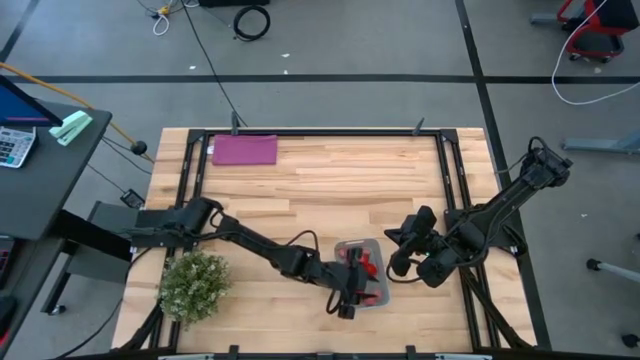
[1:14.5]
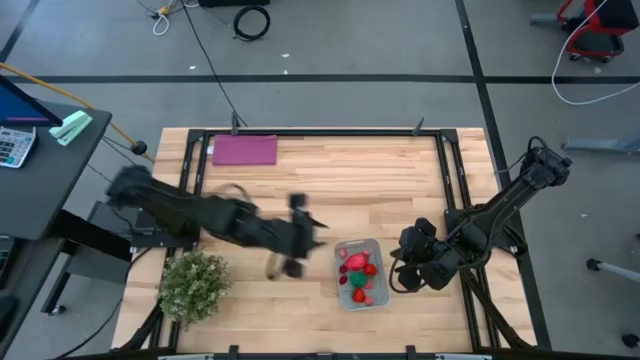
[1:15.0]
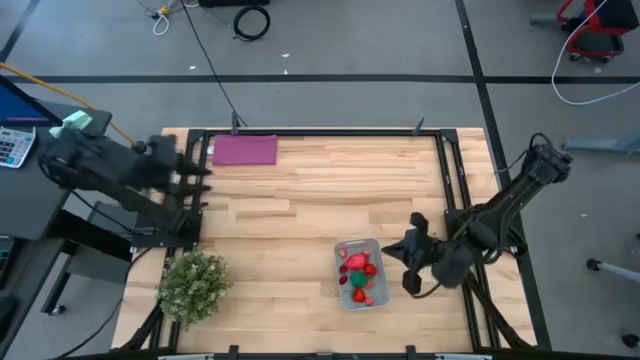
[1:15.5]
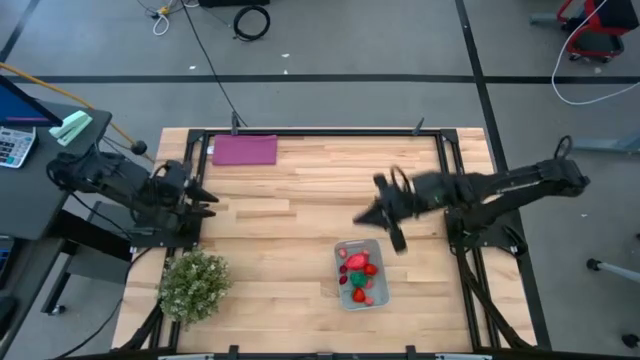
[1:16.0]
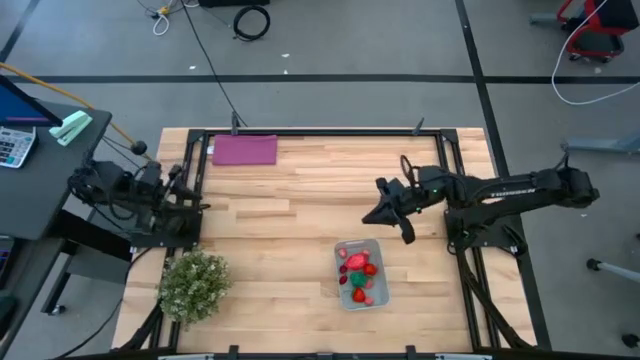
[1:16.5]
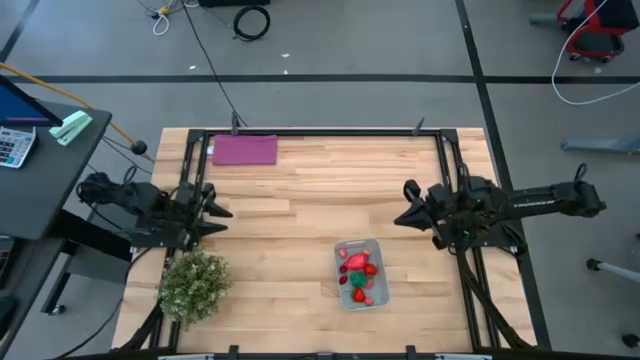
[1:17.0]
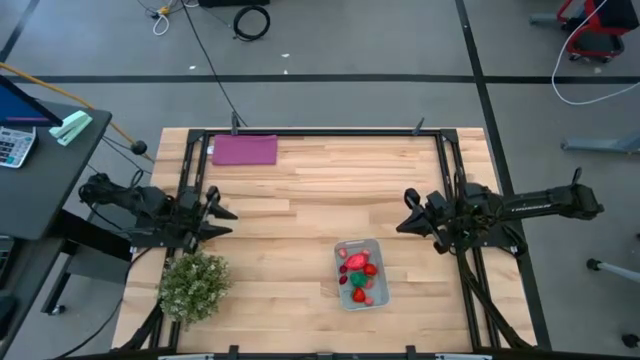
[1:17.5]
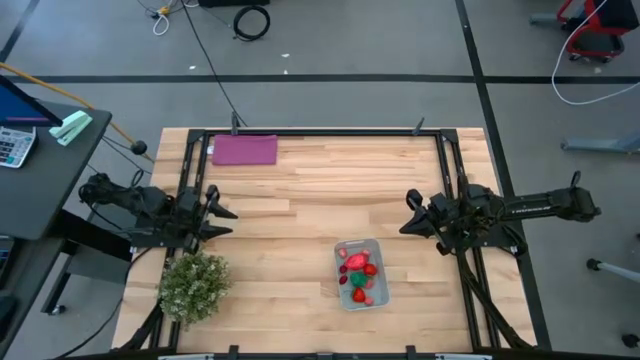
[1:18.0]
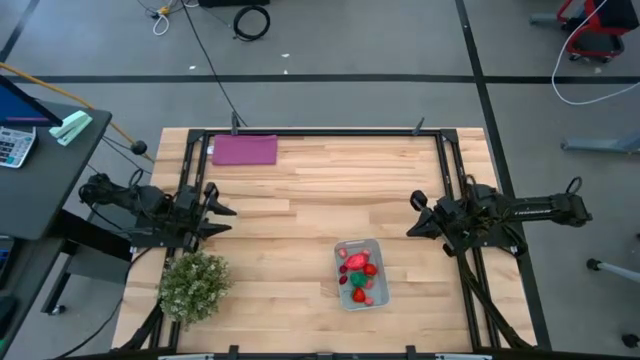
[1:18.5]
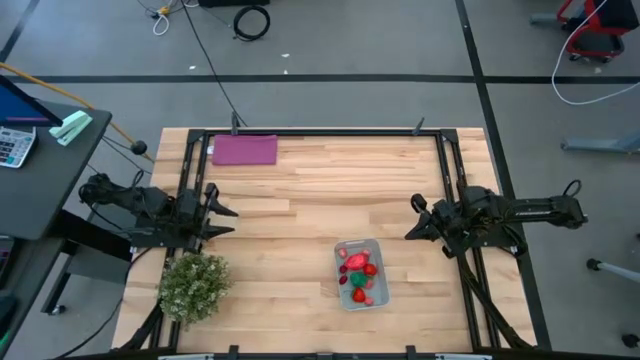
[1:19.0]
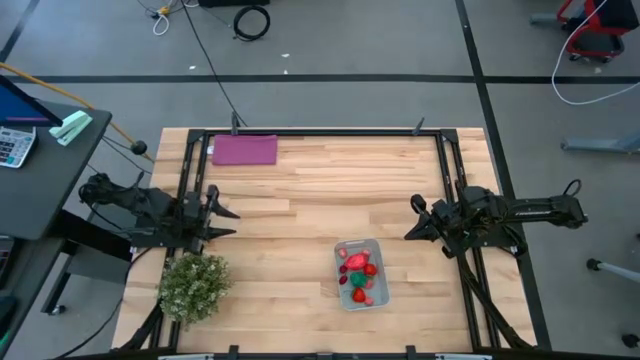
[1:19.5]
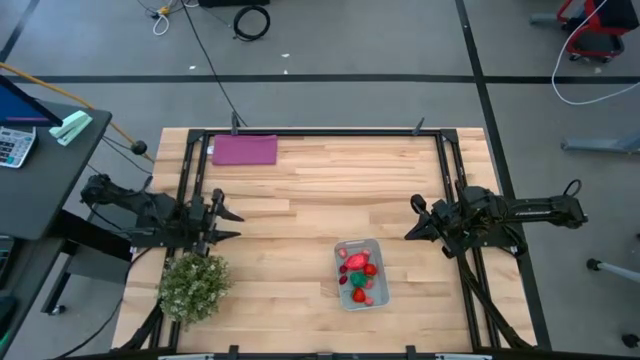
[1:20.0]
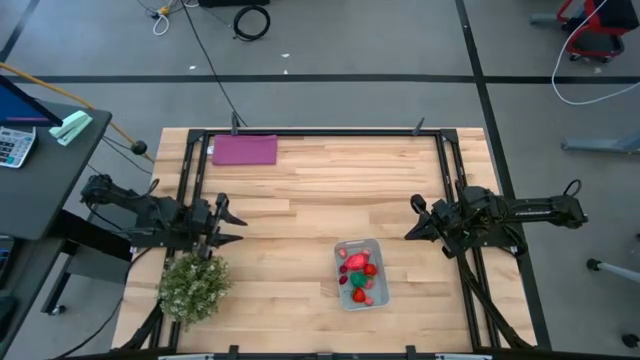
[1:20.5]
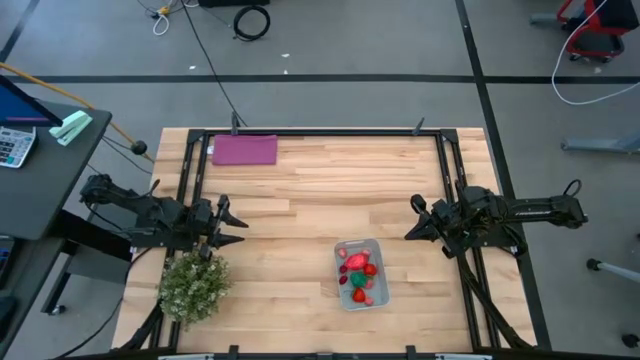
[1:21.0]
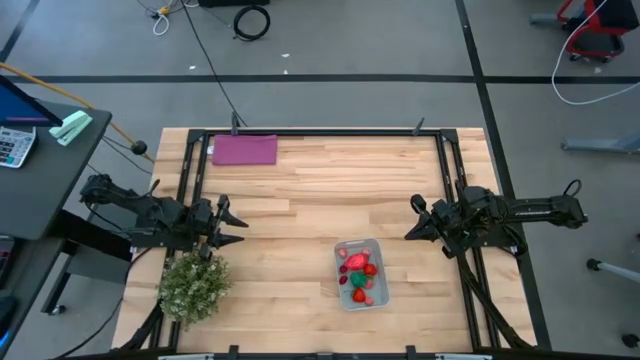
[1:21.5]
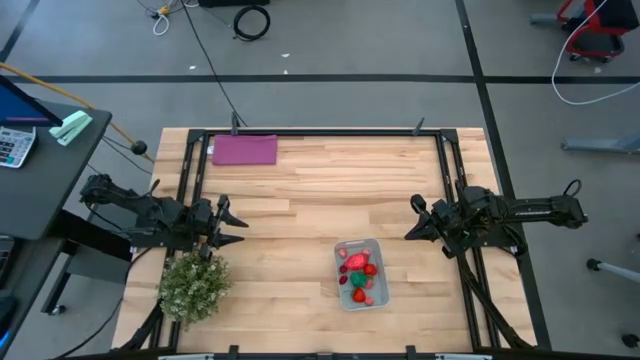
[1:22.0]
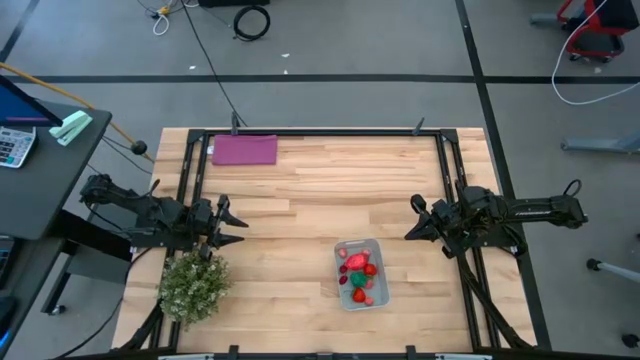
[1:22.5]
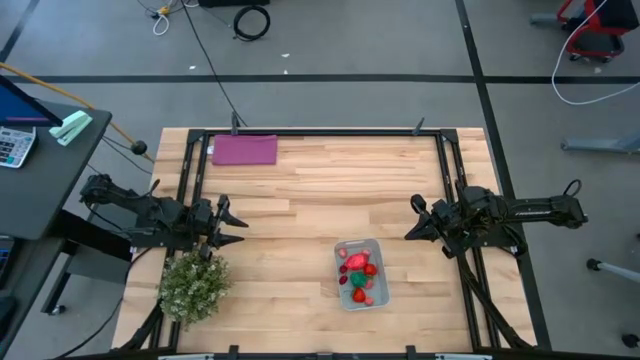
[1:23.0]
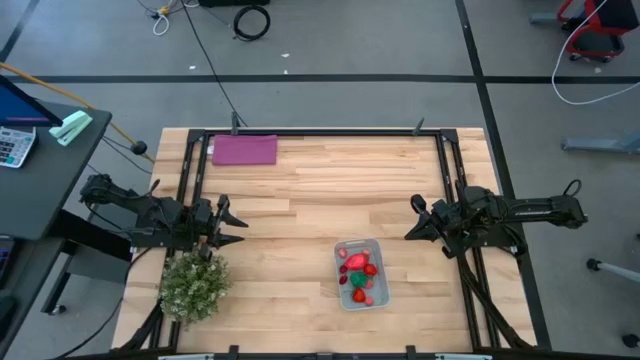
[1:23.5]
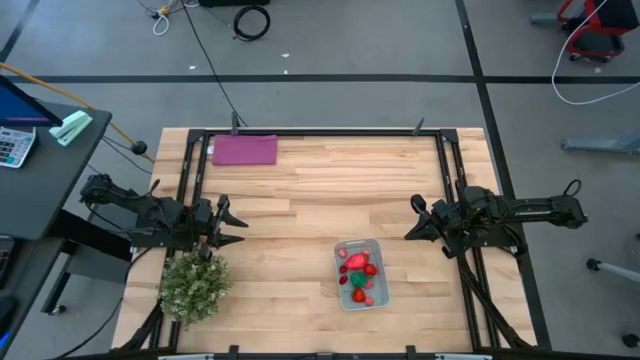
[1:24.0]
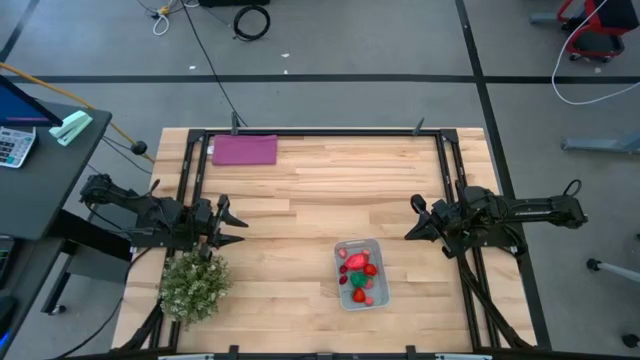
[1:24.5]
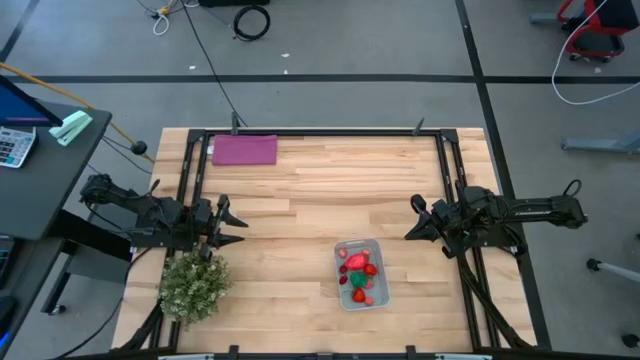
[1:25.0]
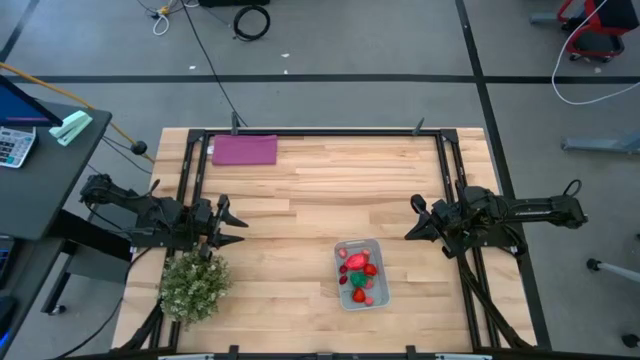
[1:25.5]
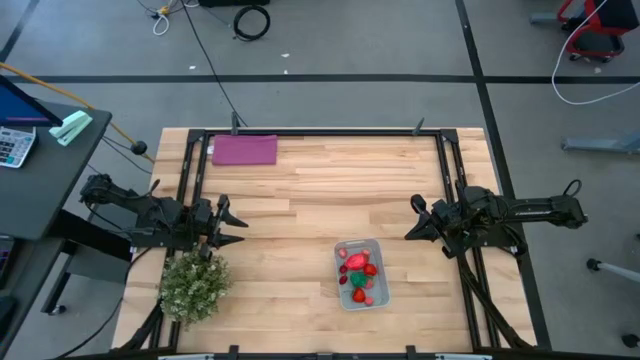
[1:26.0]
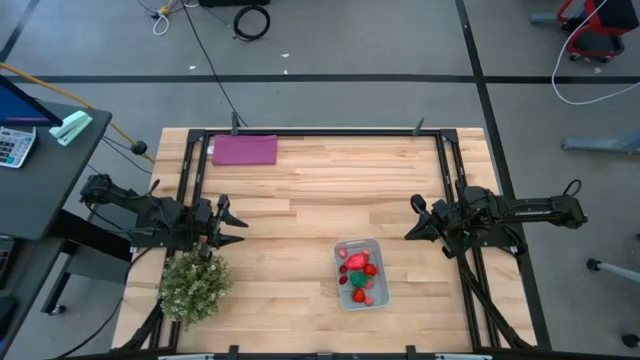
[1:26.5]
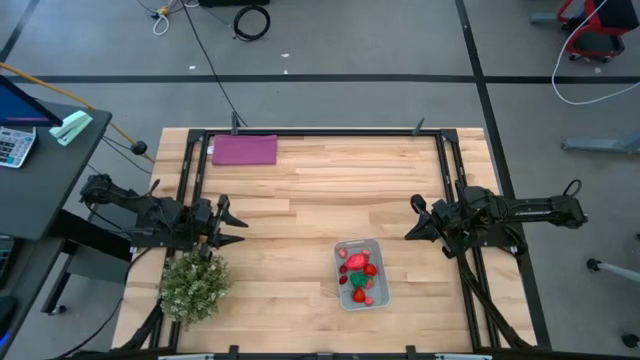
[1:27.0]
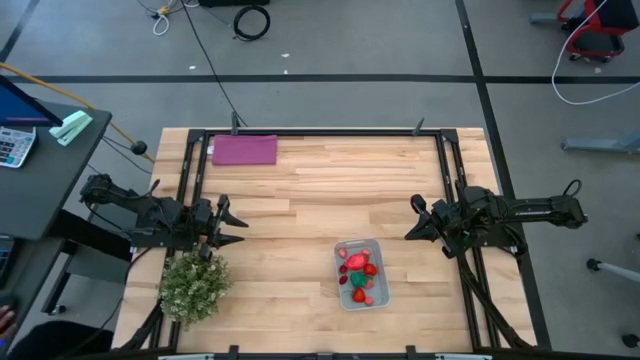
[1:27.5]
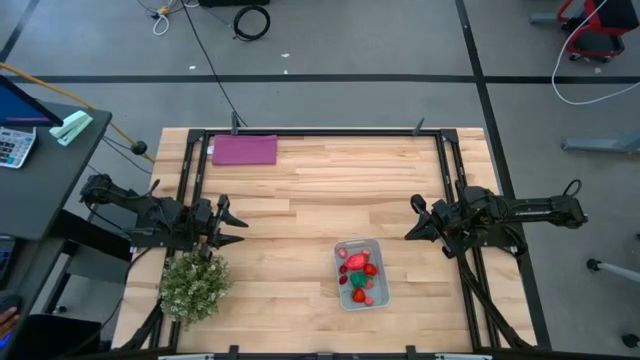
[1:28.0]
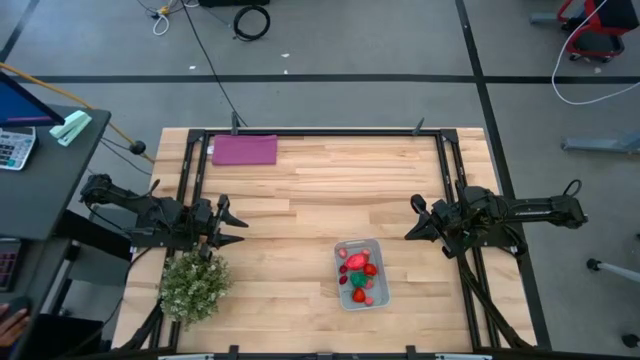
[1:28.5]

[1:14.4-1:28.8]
Task: Pick and placing Produce into tupperware
Return to Home Position

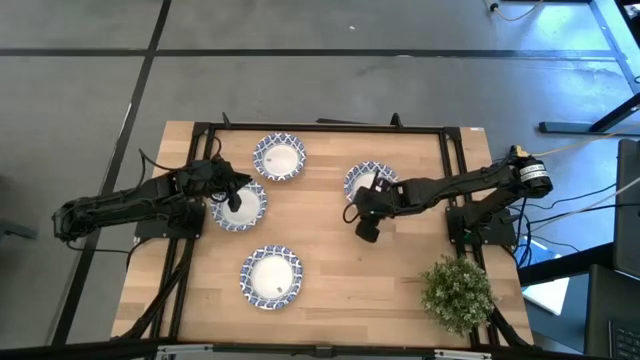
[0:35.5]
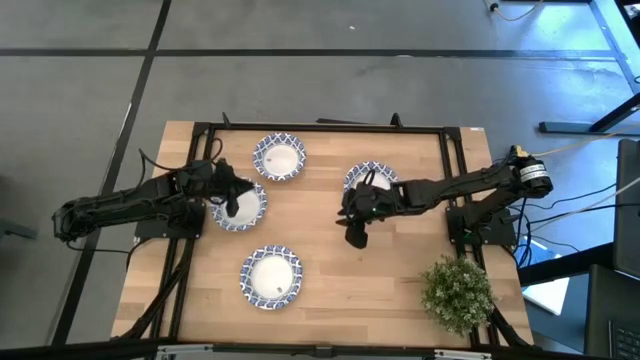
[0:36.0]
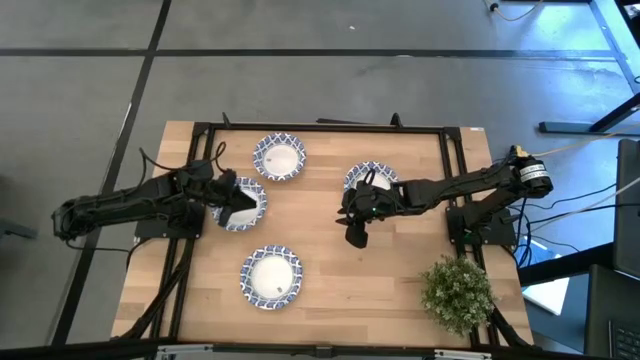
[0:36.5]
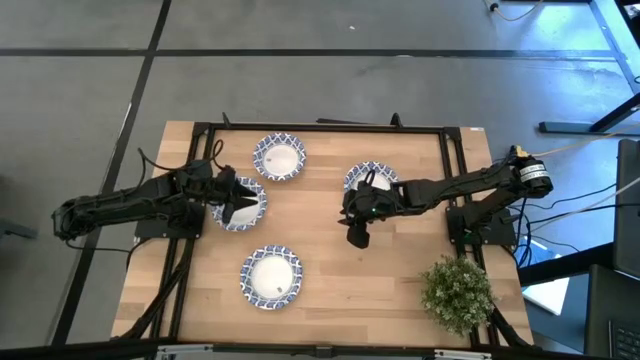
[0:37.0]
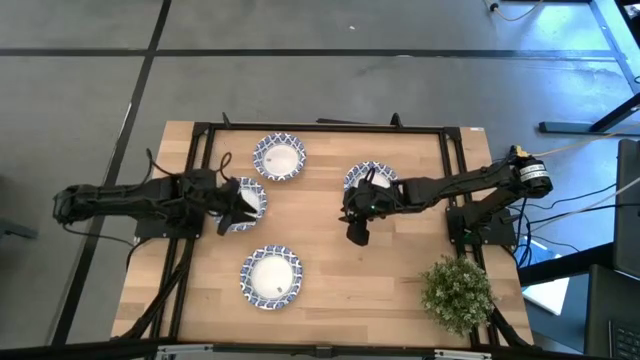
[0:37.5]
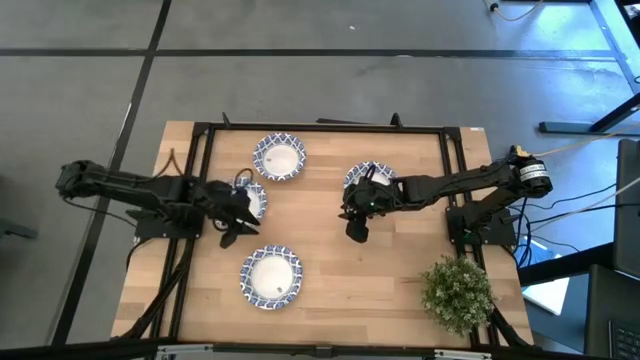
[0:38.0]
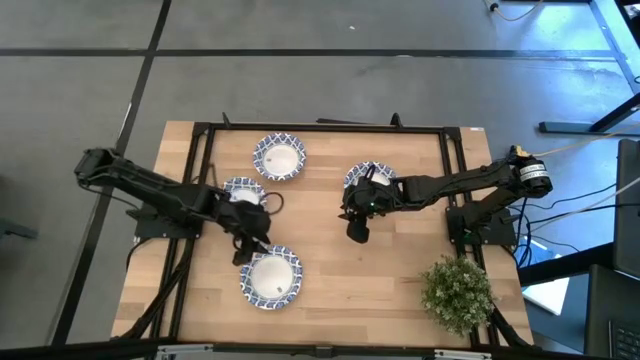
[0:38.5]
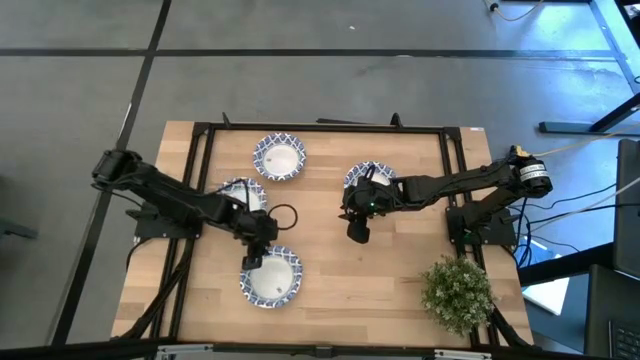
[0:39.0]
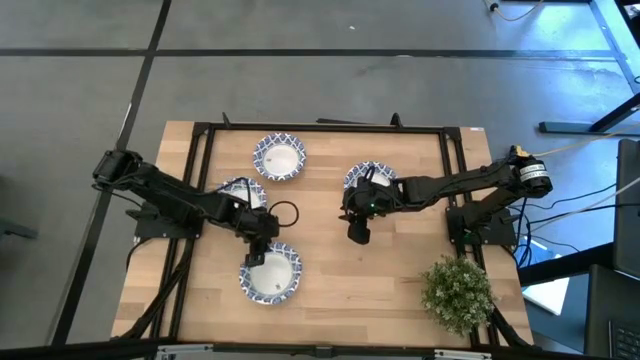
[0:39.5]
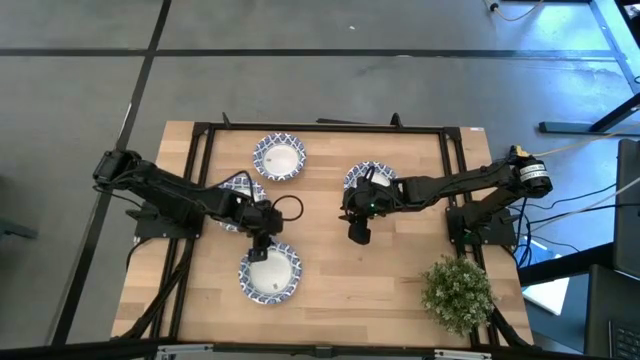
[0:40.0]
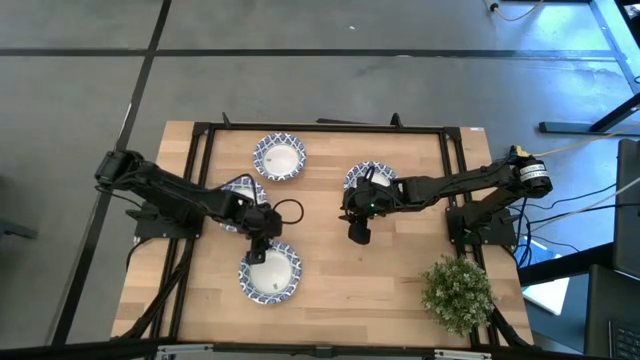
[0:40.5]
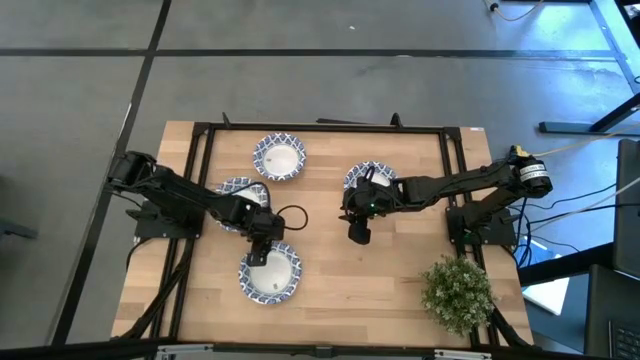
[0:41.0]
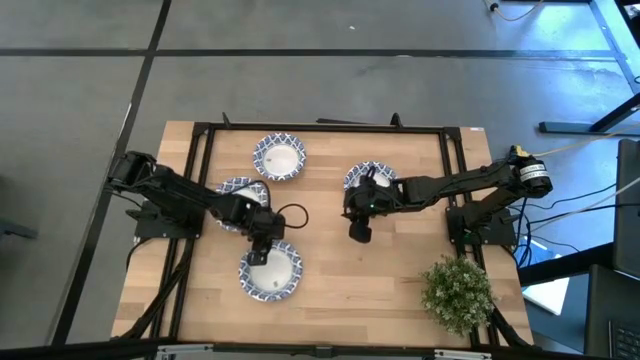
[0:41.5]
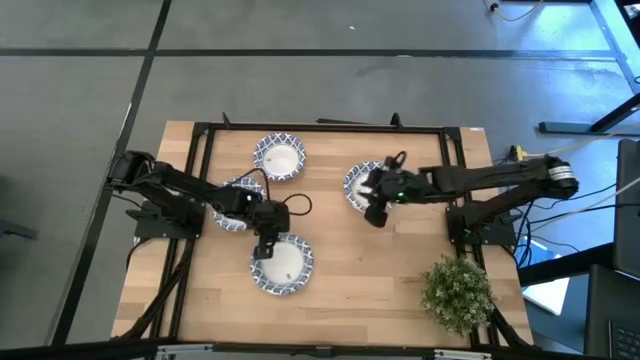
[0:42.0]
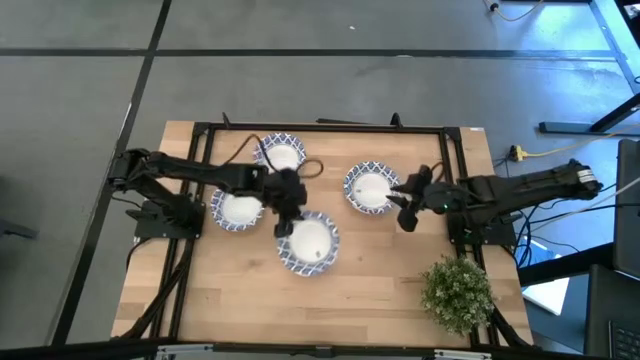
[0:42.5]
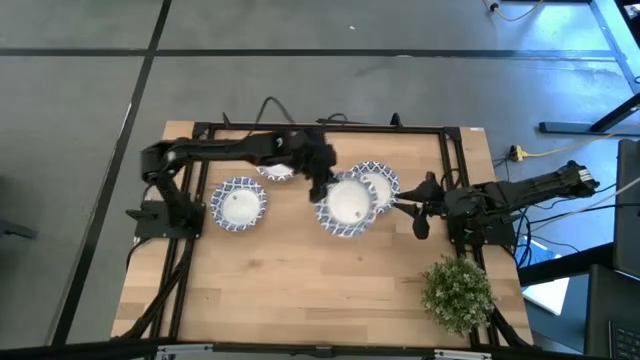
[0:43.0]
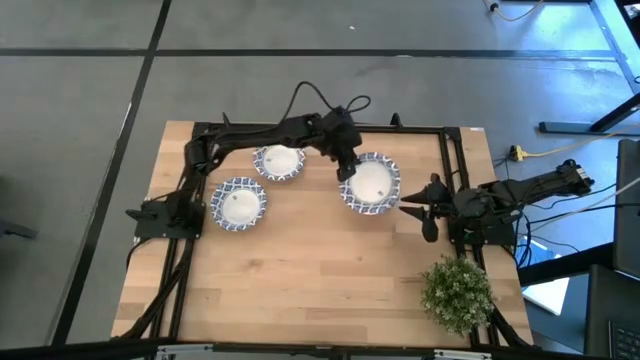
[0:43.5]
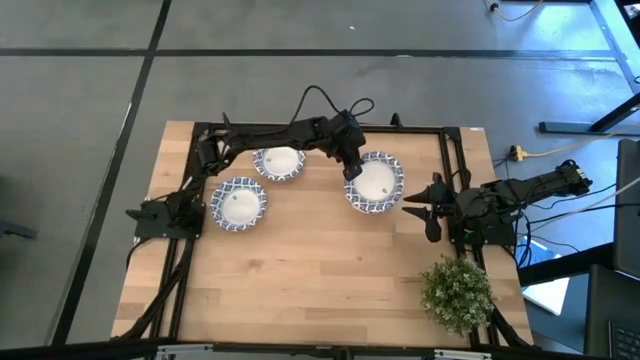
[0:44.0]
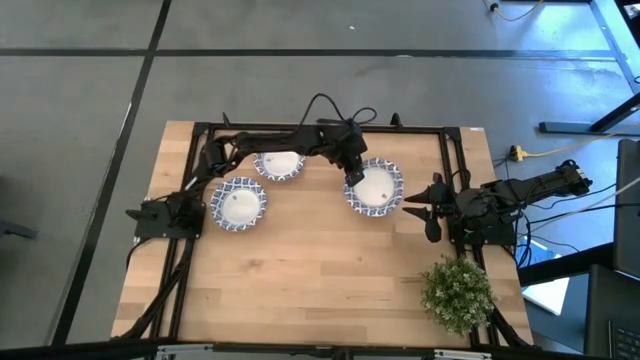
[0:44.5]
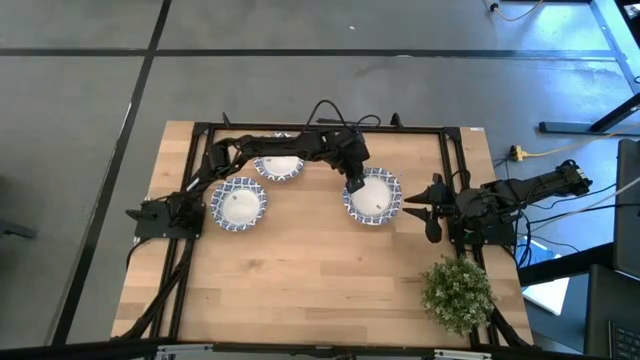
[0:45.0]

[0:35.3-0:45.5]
Task: Nest bowls inside each other
Stack the blue bowl on the blue bowls
